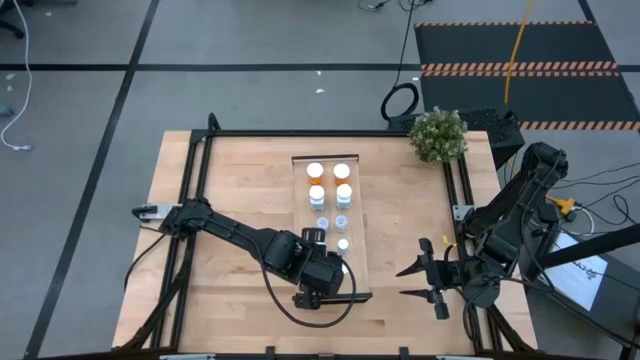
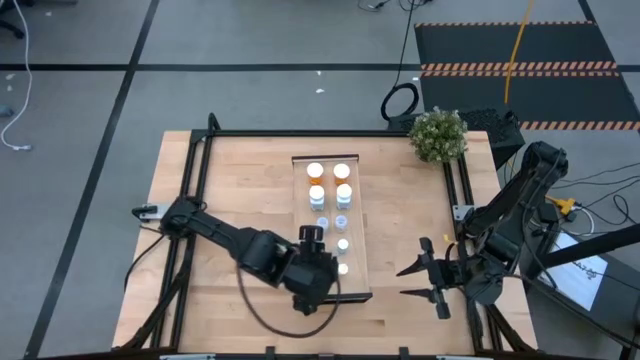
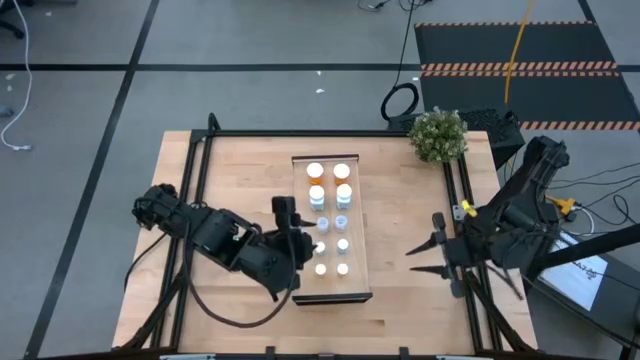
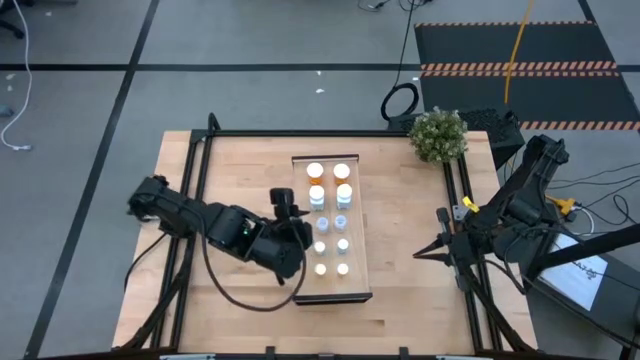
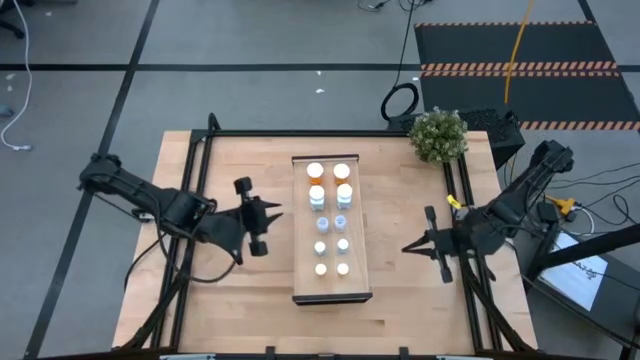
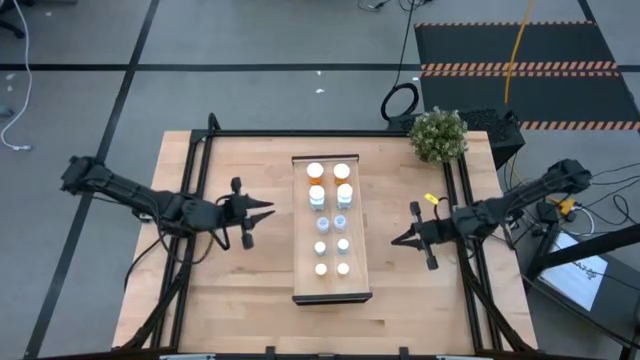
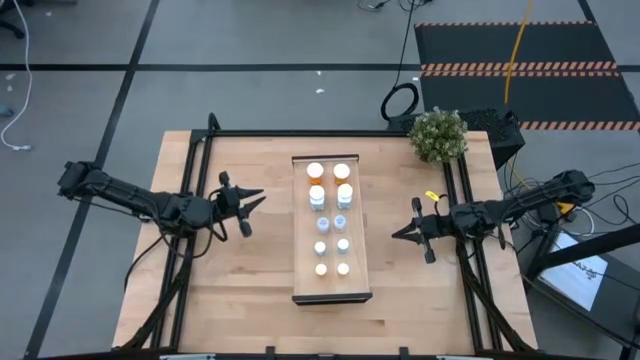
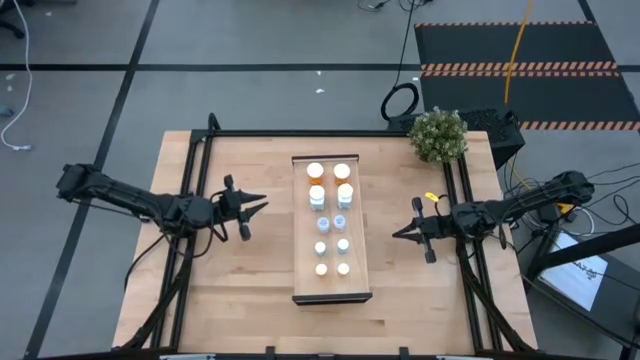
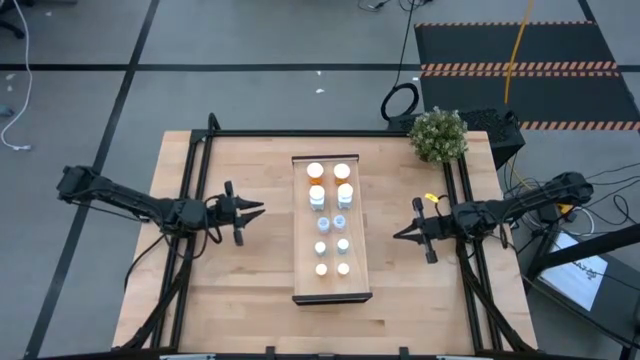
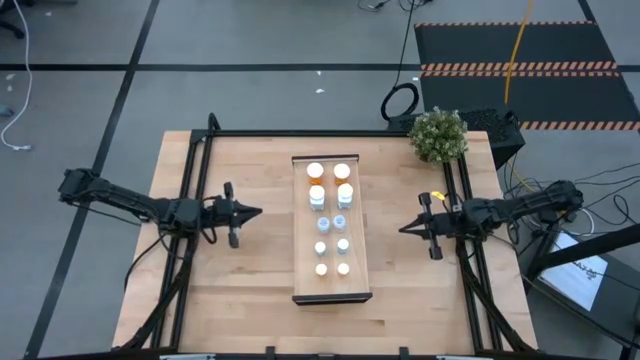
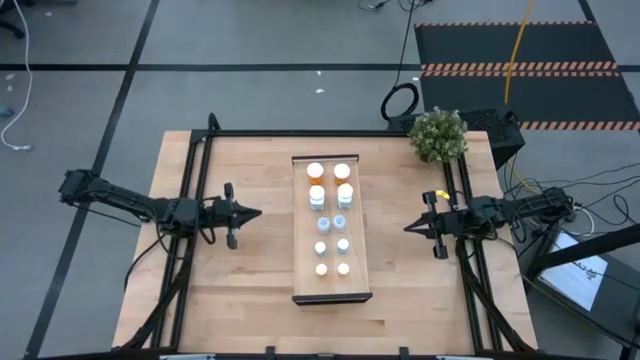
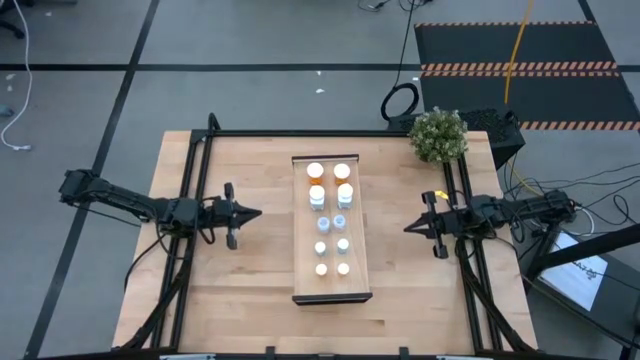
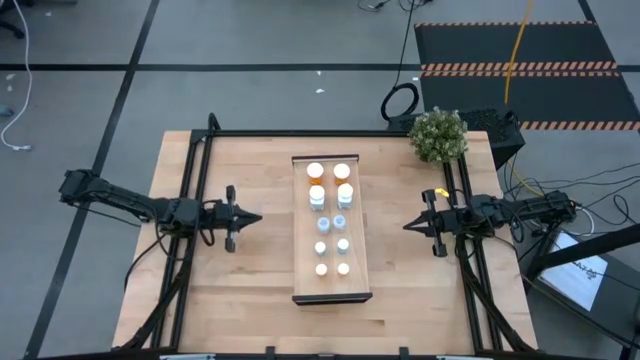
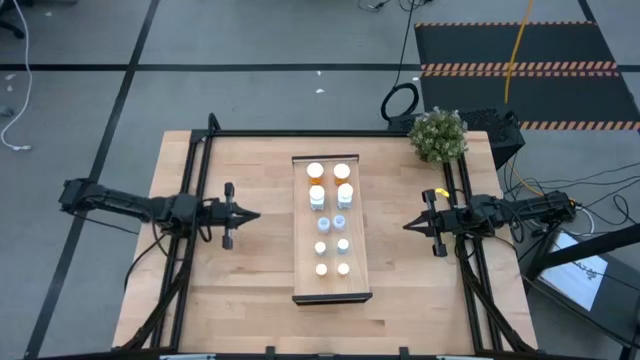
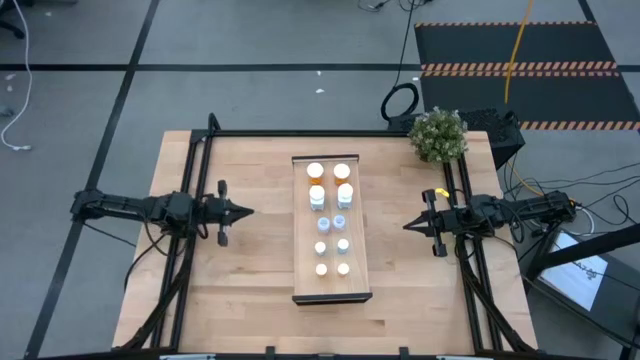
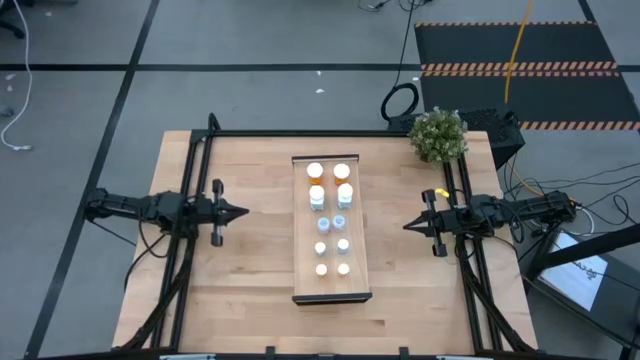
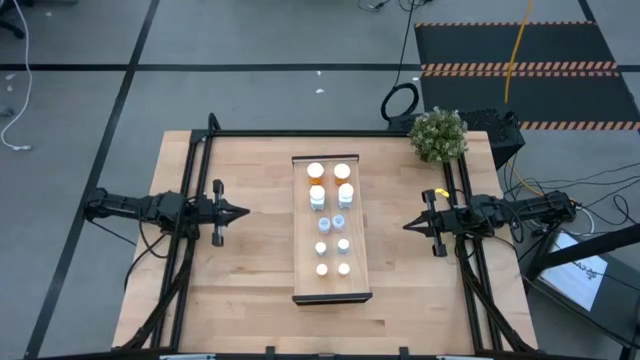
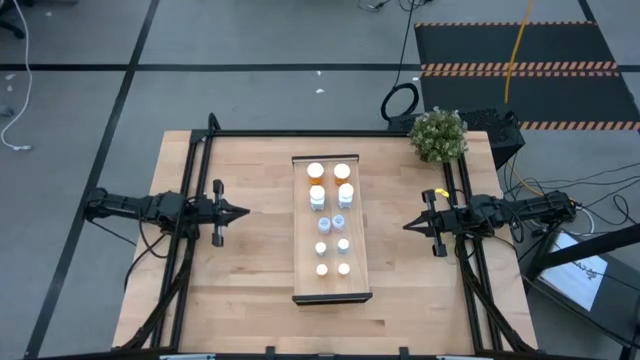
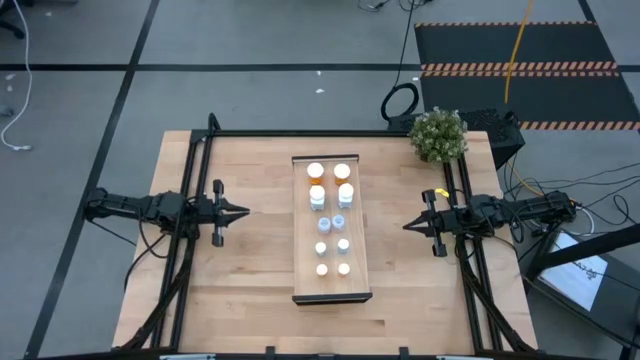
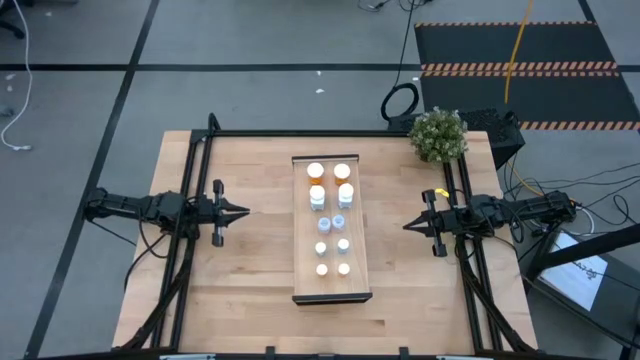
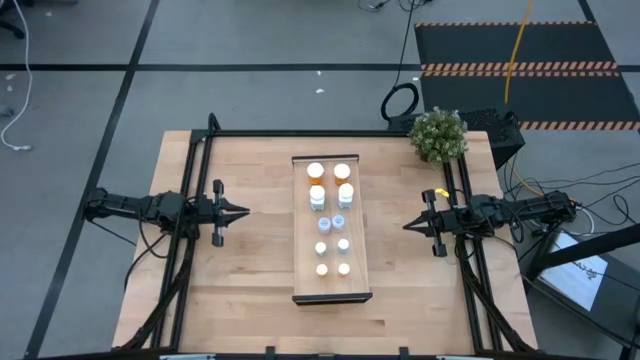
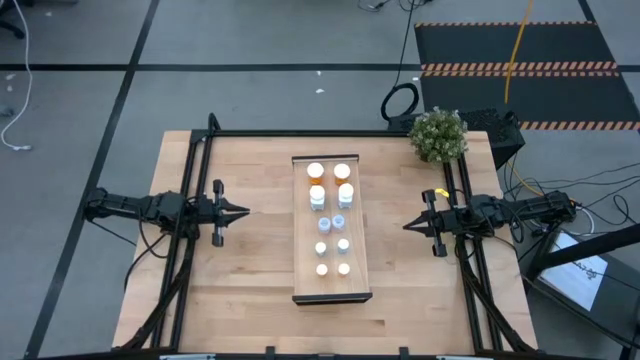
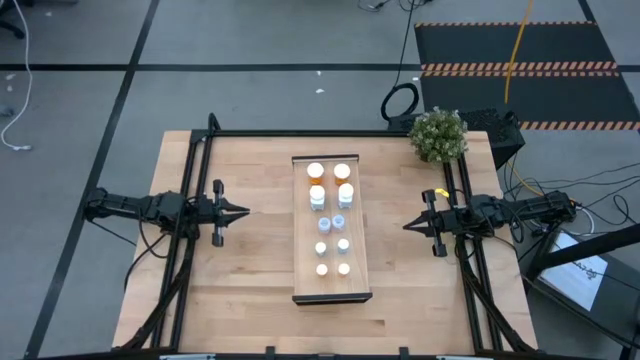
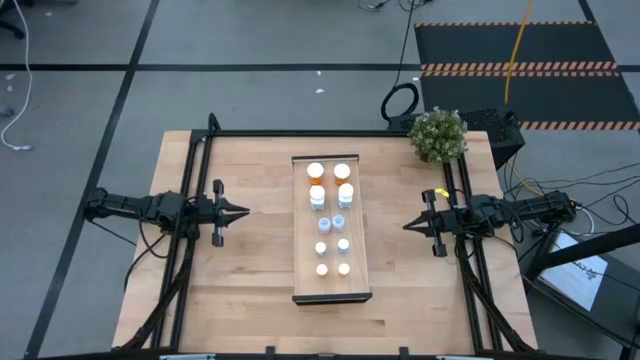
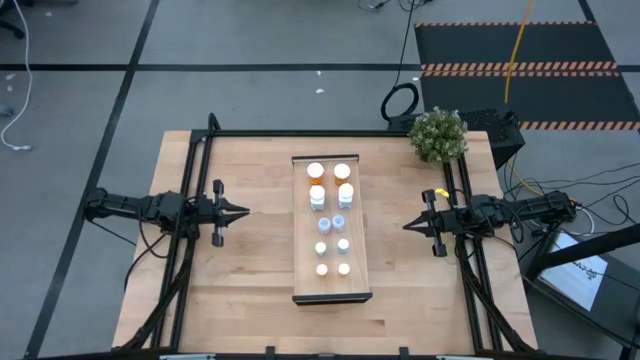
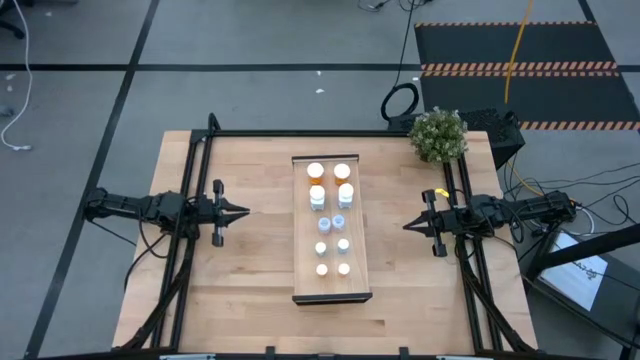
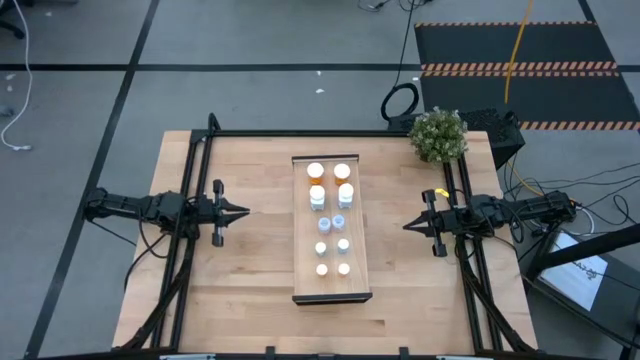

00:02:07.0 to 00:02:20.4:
Task: Pick and place medicine bottles onto shelf by color
Return to Home Position

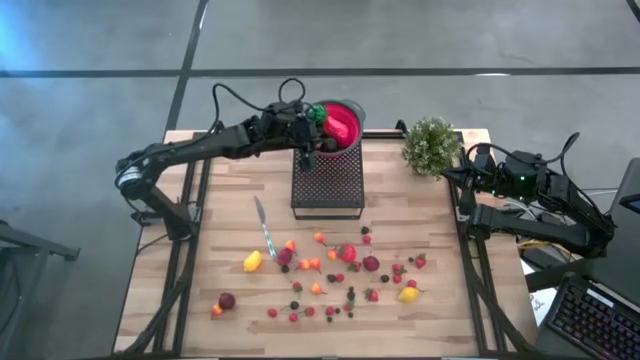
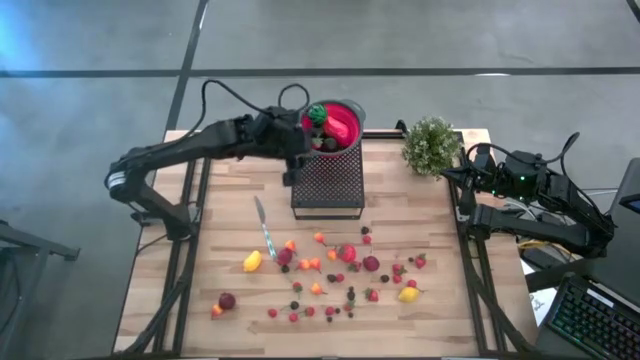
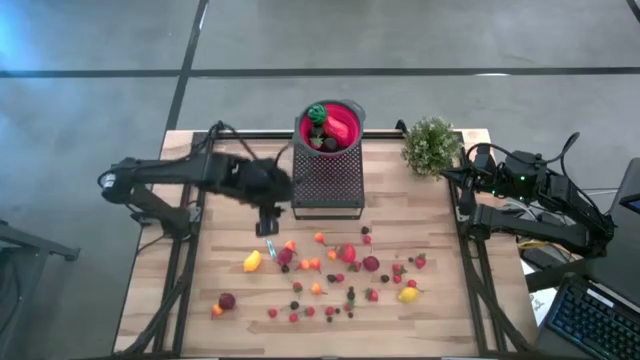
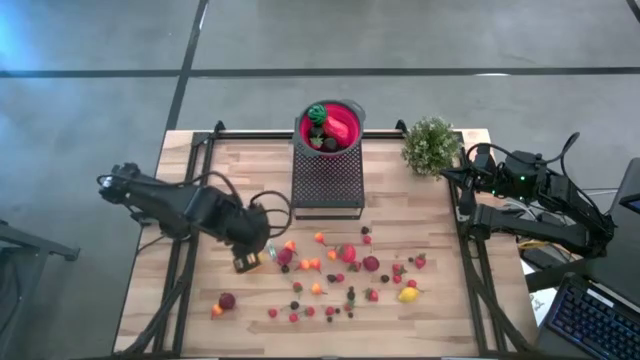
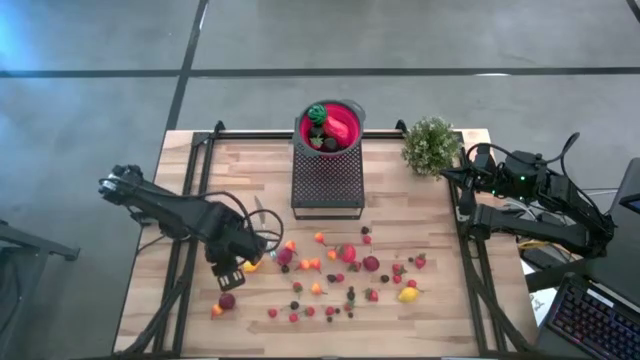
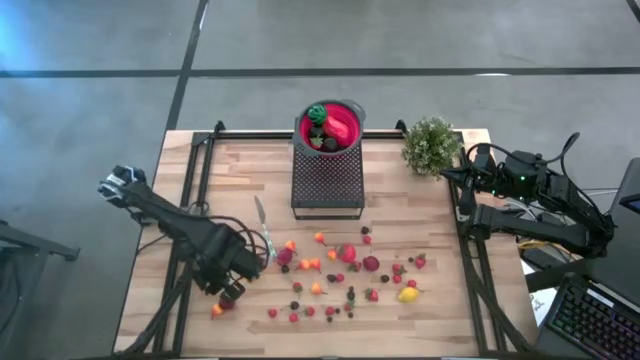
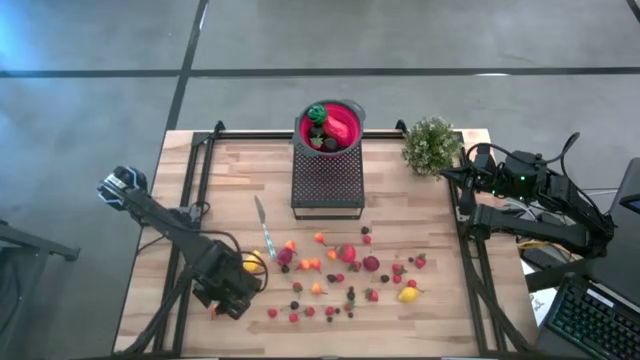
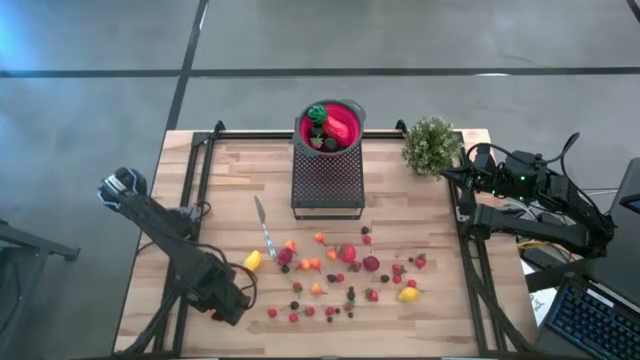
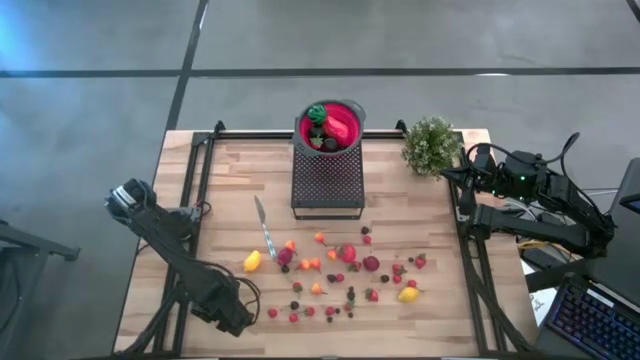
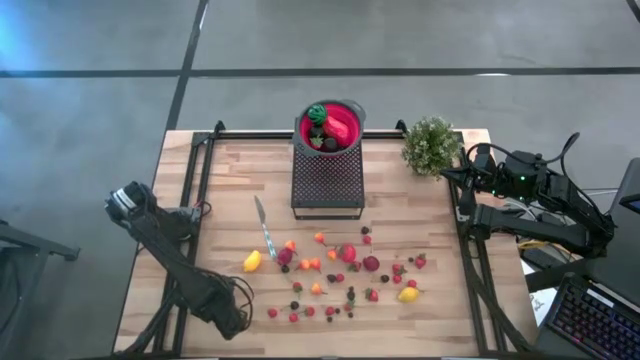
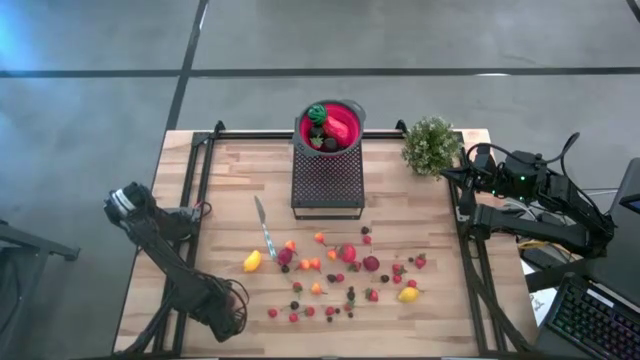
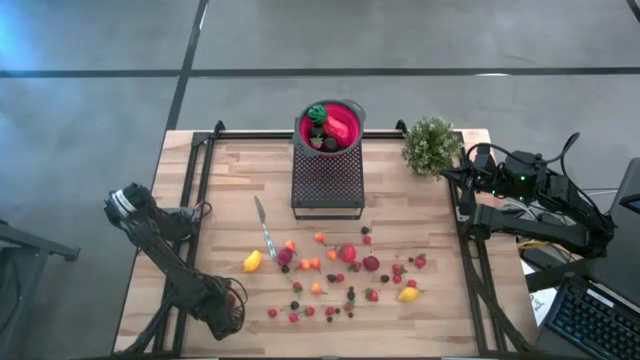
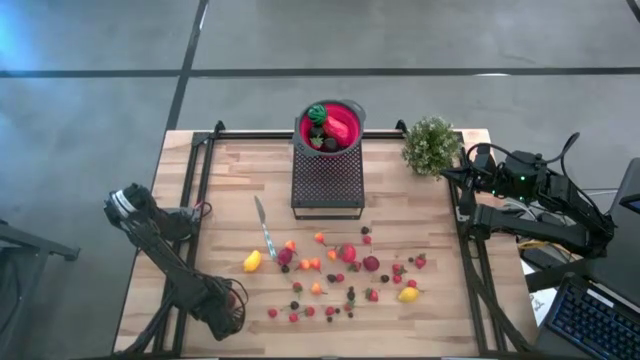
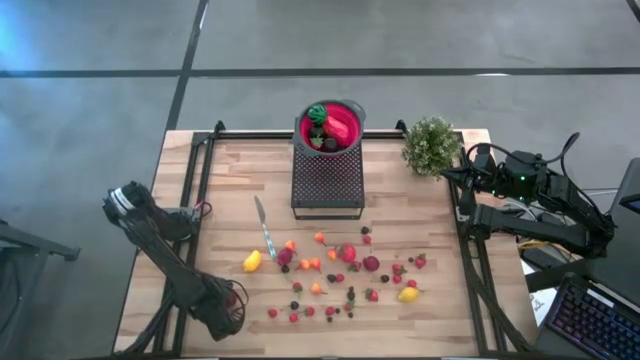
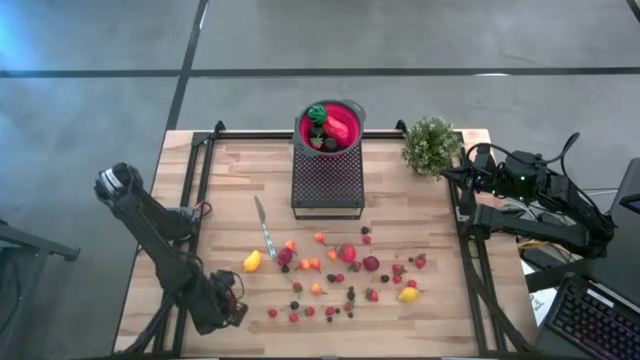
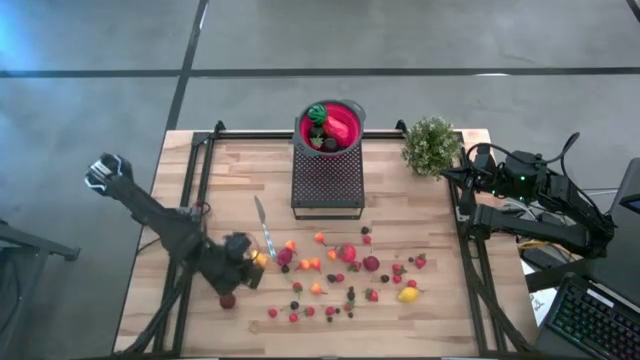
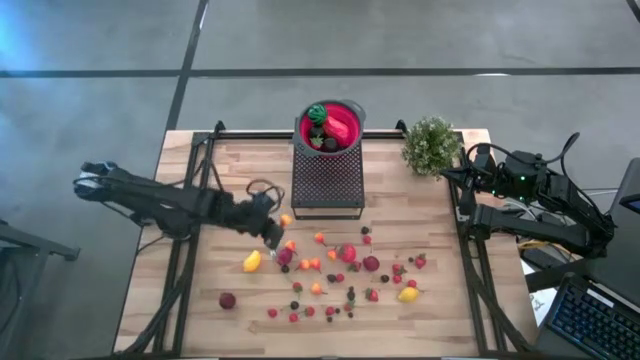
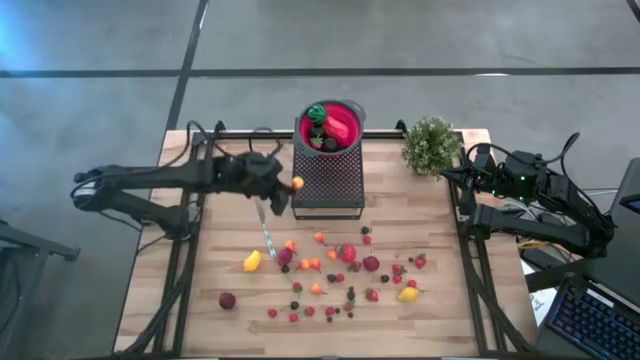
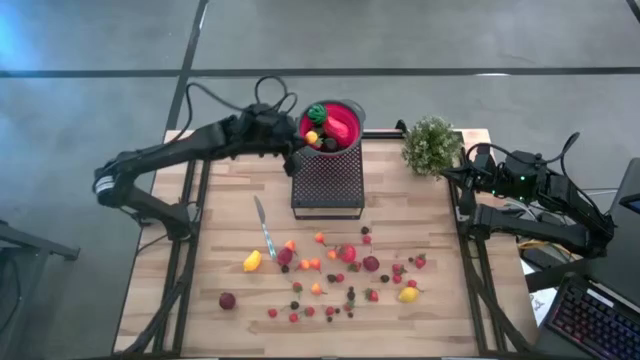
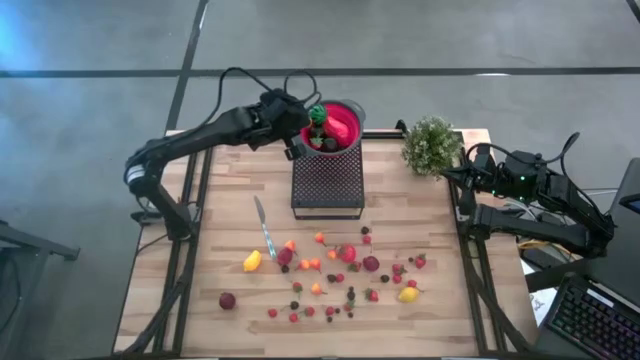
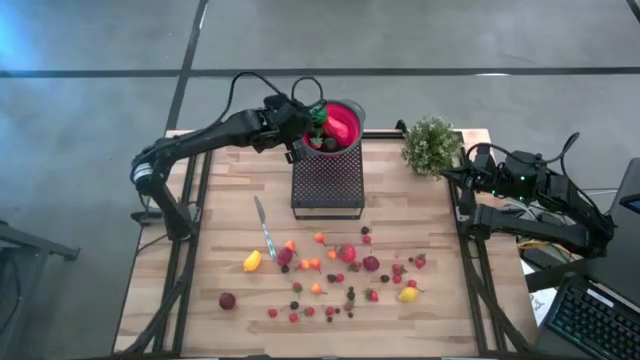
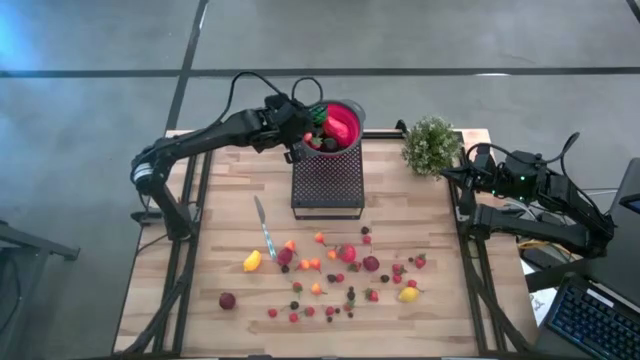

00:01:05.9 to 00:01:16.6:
Task: Pick & Place Fruit
Put the pear into the strainer bowl on the shelf
